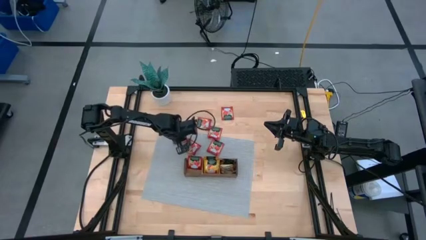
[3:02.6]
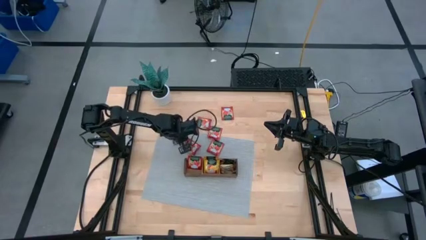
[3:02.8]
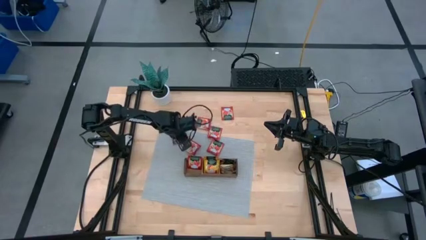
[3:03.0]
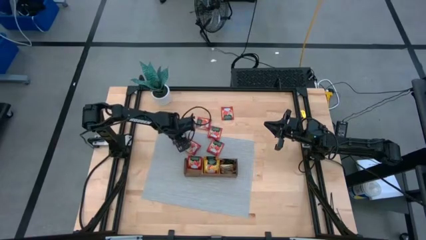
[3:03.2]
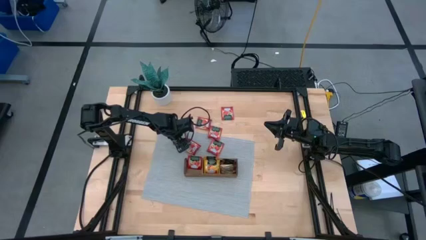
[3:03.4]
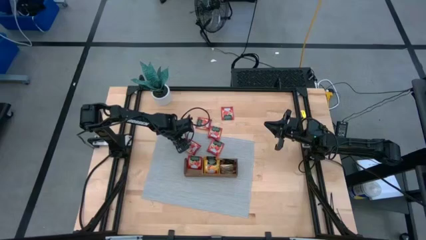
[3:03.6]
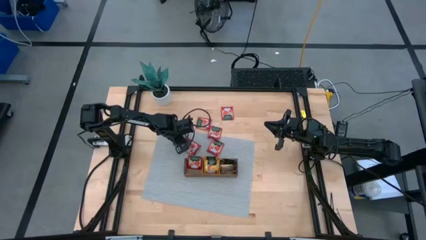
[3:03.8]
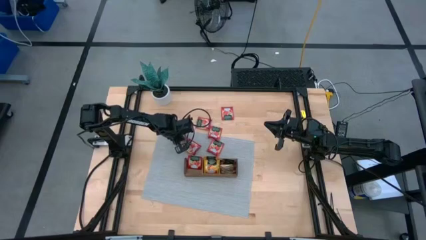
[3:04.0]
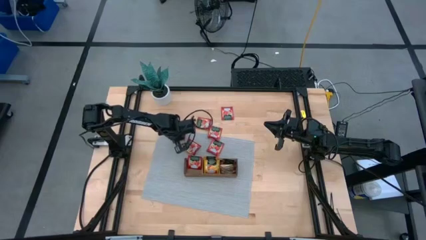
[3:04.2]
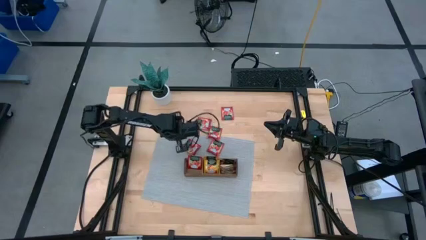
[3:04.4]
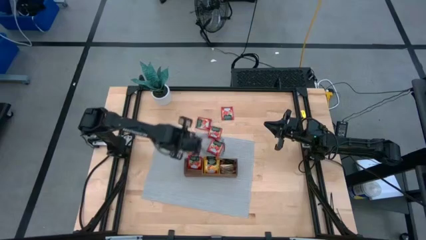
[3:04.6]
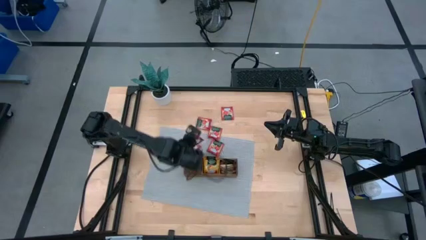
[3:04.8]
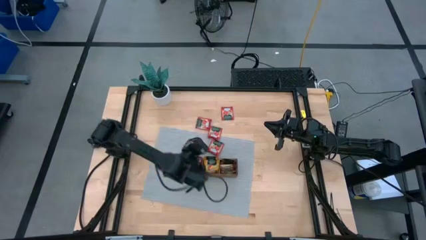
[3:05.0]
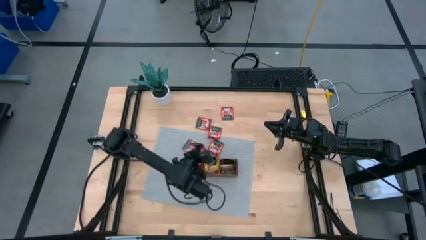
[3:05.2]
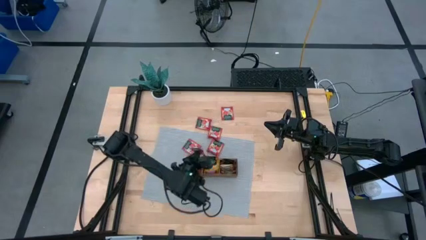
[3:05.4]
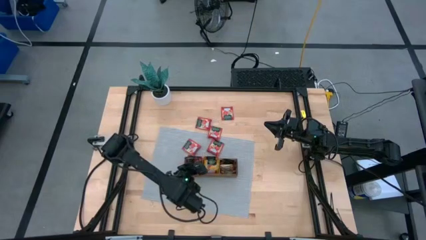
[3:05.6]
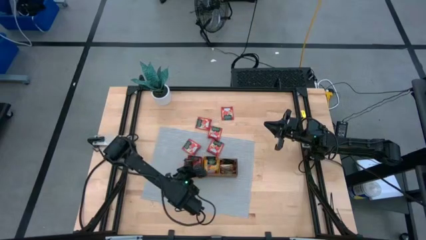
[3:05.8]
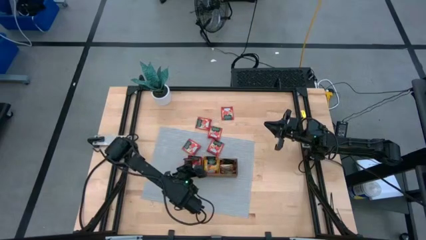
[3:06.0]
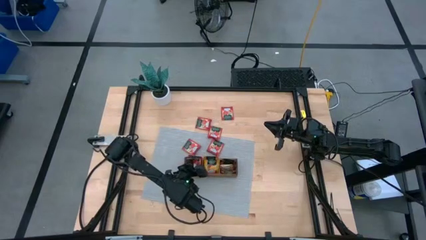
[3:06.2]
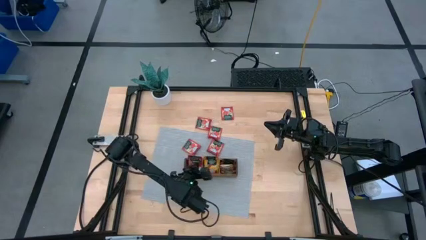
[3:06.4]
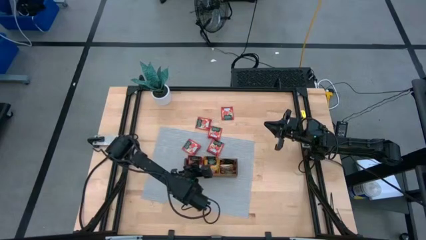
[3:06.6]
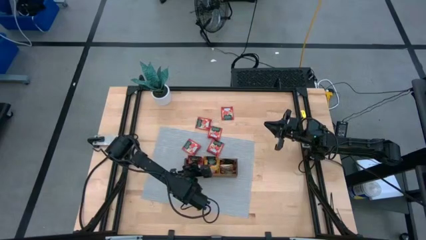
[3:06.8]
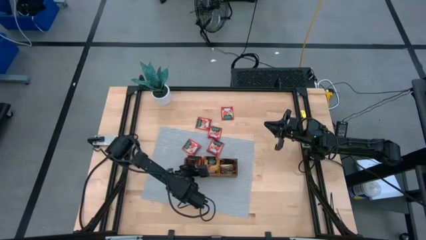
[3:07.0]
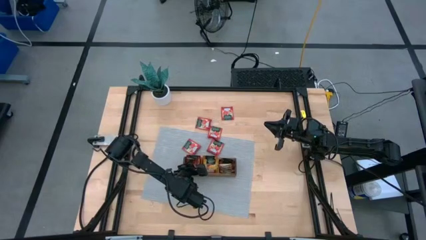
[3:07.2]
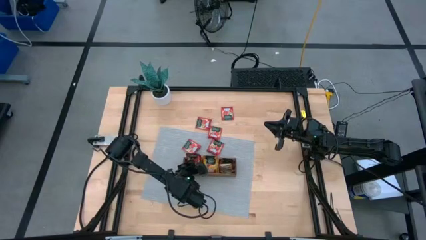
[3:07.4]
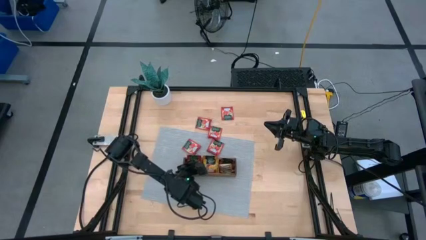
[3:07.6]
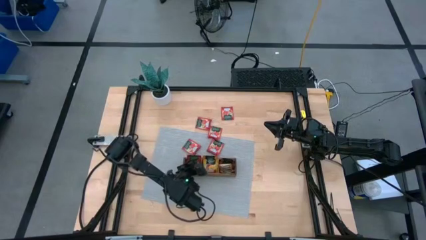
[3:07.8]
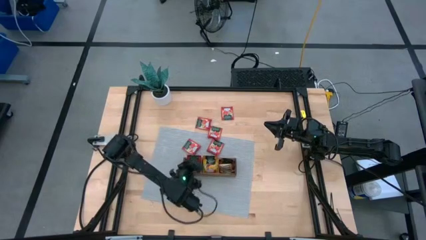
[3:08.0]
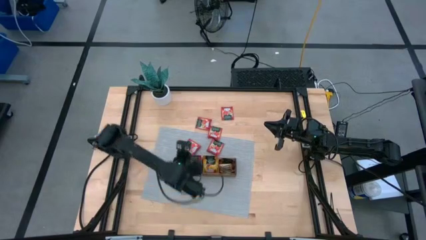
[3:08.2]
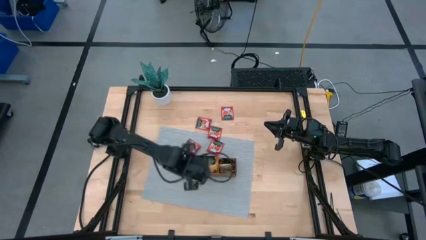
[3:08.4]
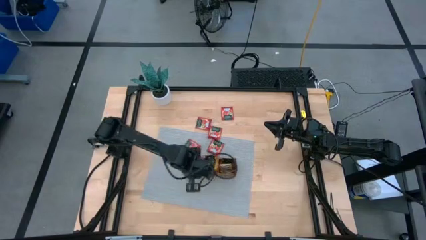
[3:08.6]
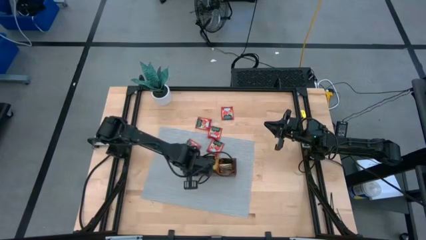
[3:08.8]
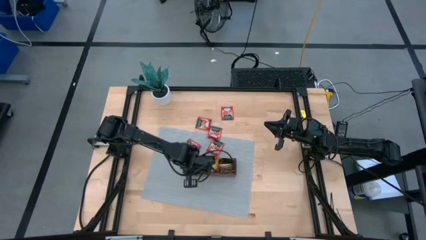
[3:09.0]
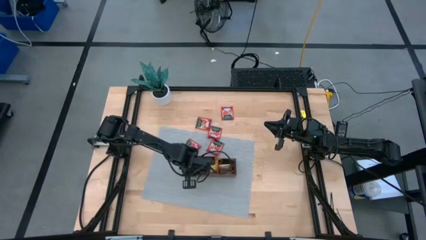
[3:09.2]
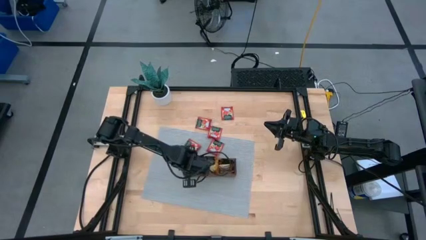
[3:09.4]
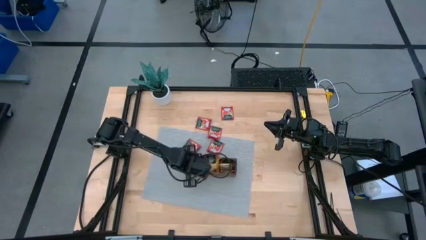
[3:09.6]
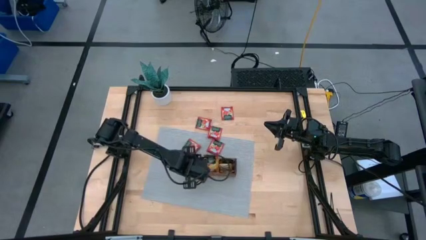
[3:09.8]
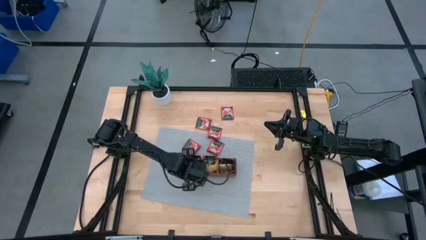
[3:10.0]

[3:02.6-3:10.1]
Task: Pick & Place Tea
Put the red tea bag into the left compartment of the wood organizer

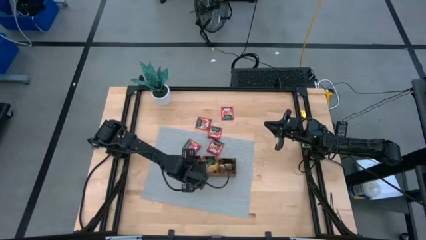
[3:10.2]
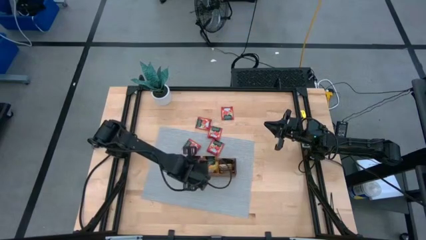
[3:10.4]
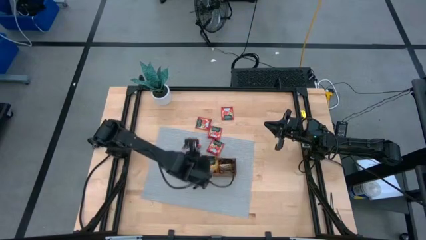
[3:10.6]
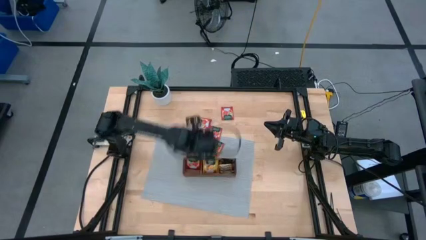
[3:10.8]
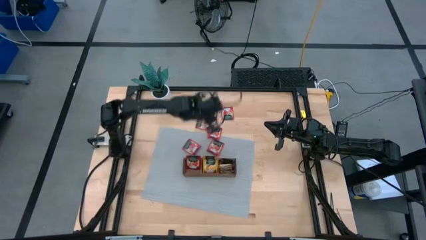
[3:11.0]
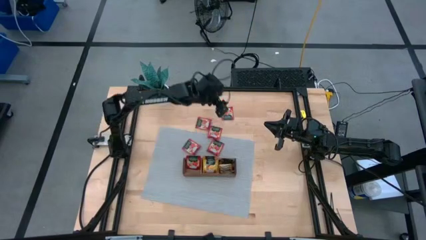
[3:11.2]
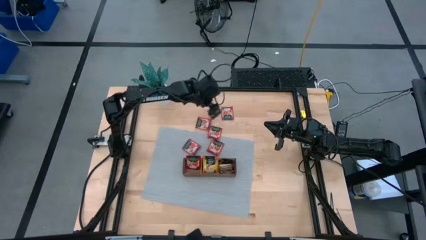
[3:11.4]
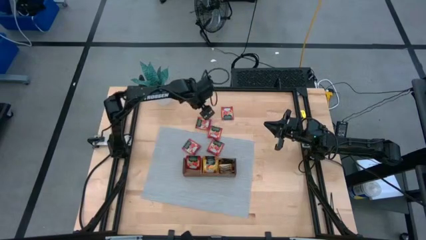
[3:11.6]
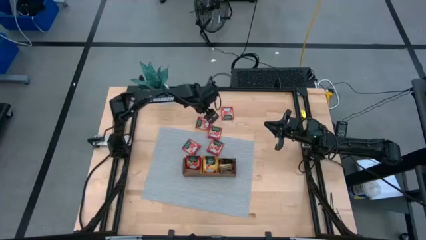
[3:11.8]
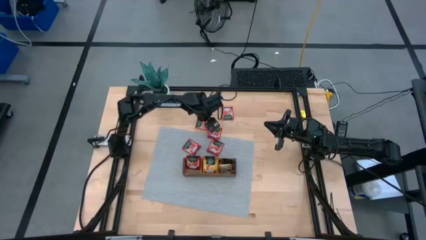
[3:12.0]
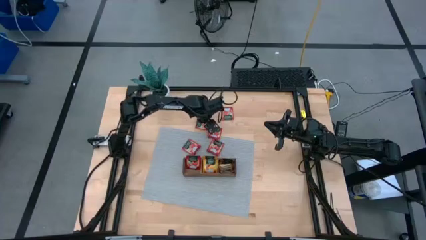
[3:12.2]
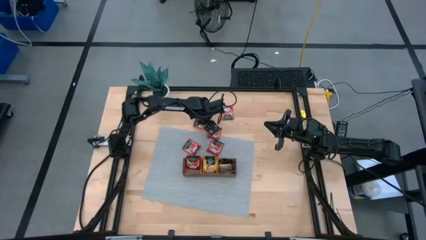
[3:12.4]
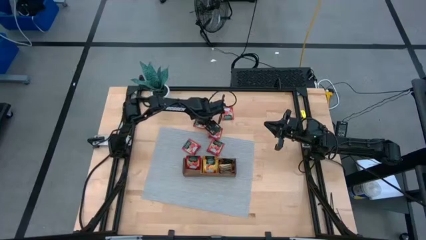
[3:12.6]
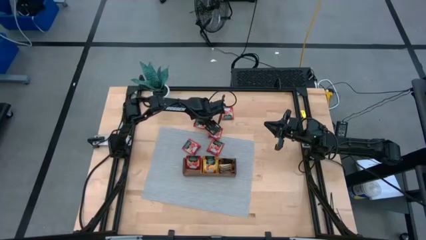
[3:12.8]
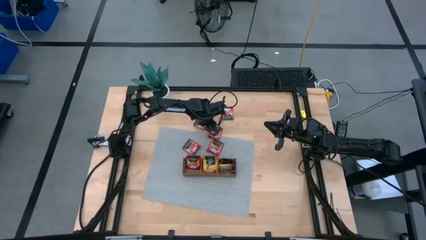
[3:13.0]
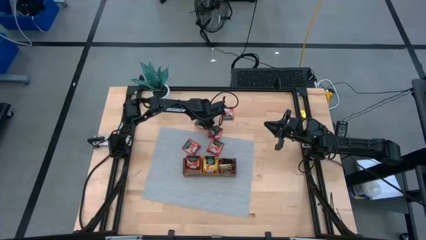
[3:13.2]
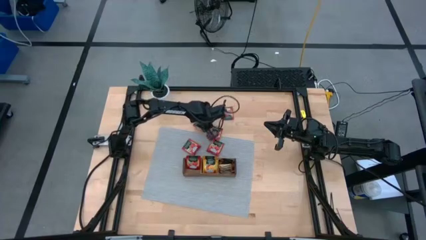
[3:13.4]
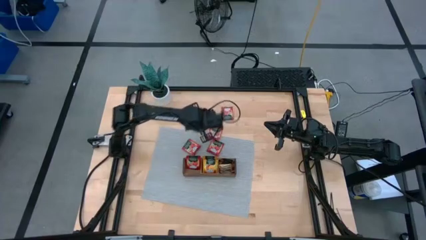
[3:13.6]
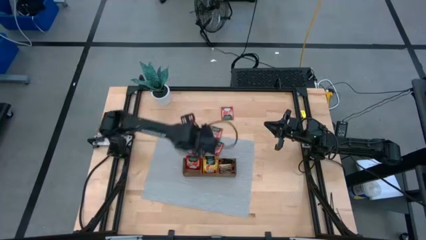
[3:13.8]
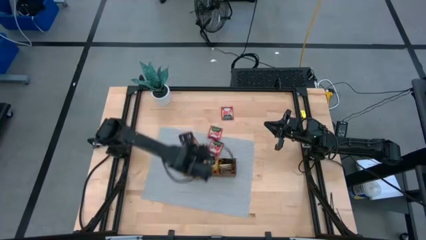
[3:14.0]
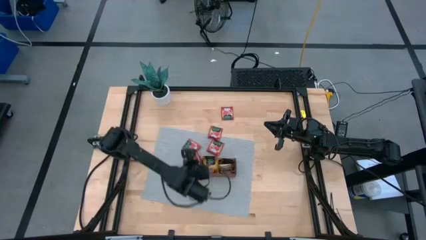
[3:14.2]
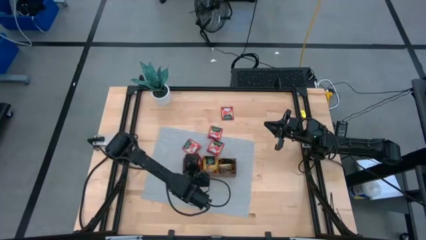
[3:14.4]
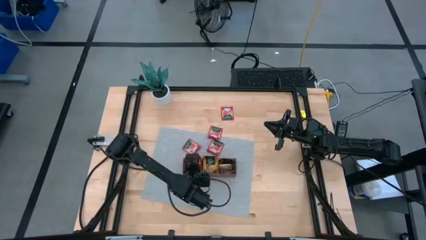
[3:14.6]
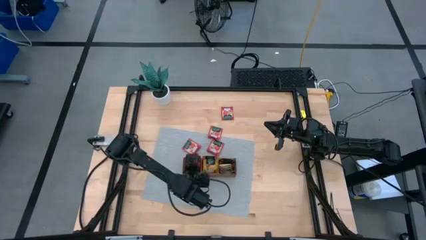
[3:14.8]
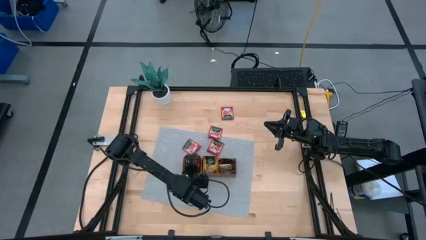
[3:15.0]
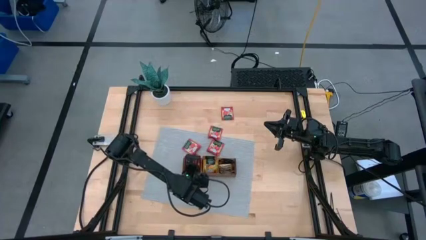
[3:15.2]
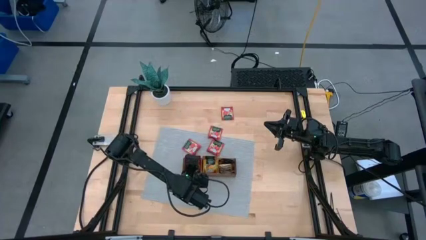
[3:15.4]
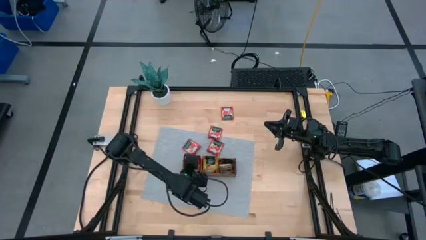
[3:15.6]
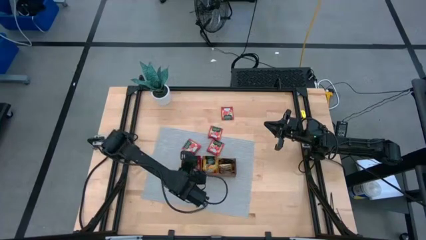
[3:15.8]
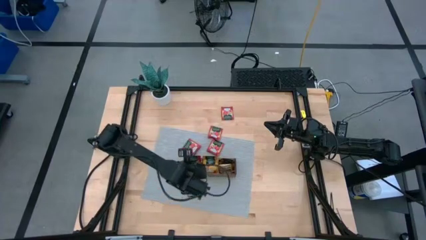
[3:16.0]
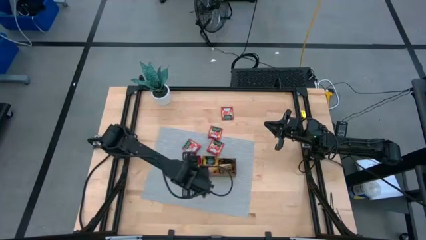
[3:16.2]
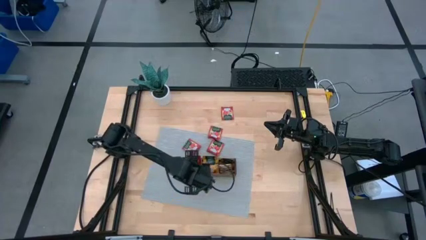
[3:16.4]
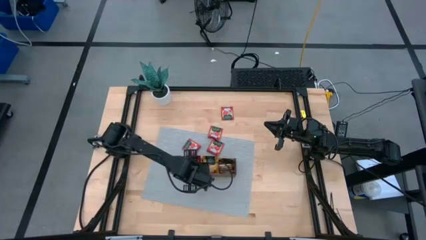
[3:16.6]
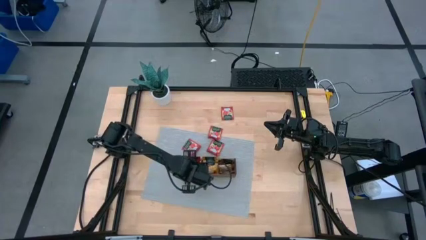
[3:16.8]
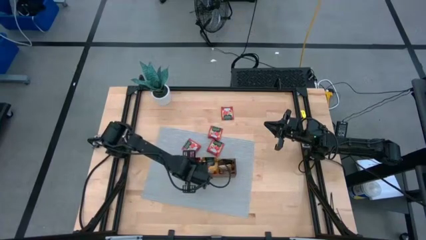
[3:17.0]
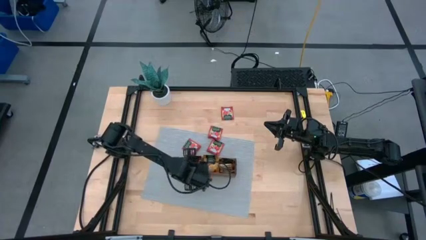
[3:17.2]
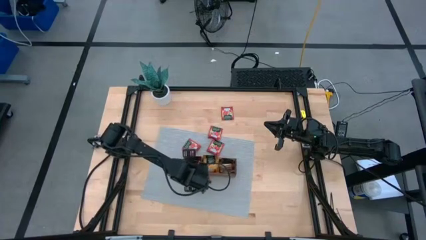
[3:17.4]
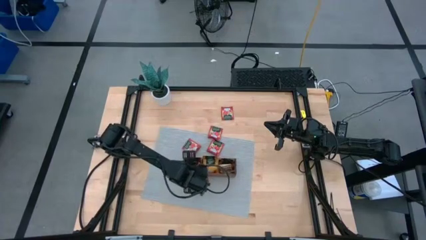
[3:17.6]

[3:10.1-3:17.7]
Put the red tea bag into the left compartment of the wood organizer

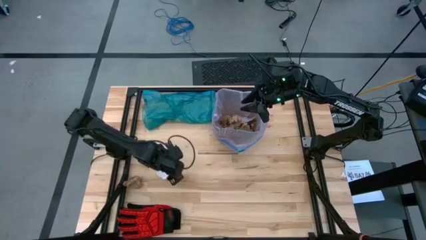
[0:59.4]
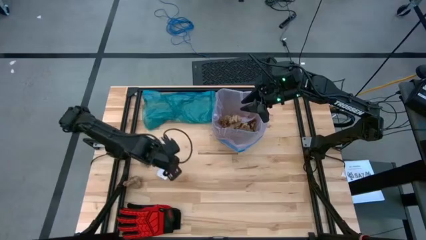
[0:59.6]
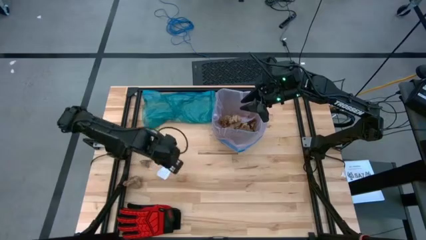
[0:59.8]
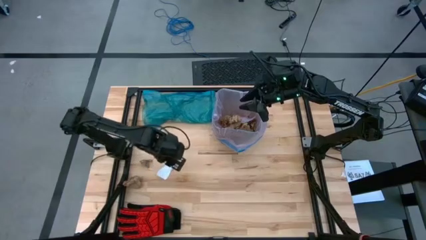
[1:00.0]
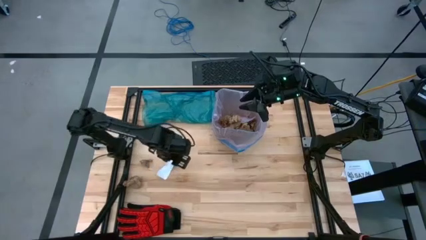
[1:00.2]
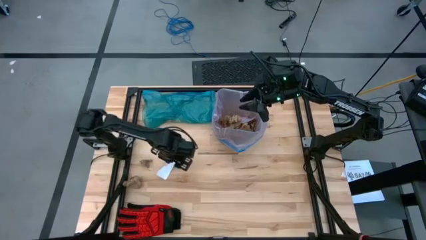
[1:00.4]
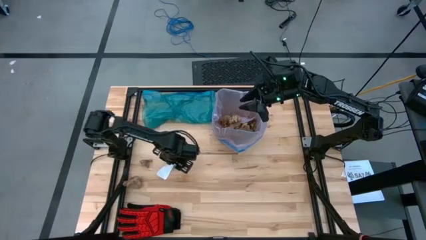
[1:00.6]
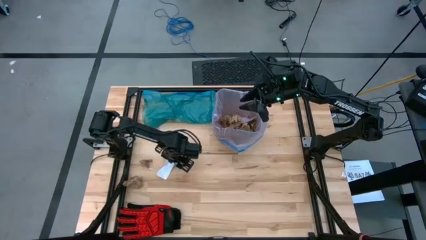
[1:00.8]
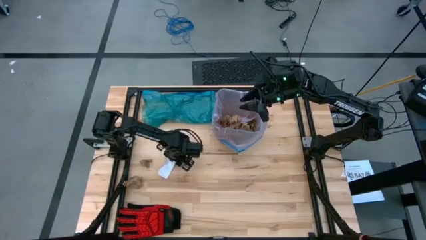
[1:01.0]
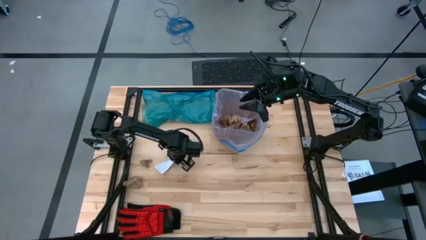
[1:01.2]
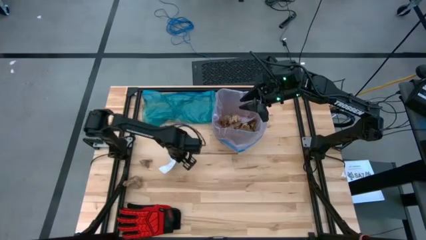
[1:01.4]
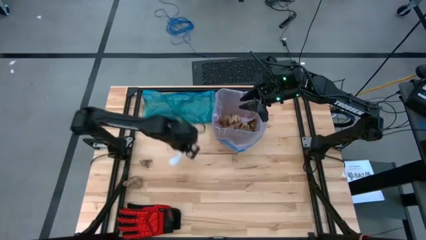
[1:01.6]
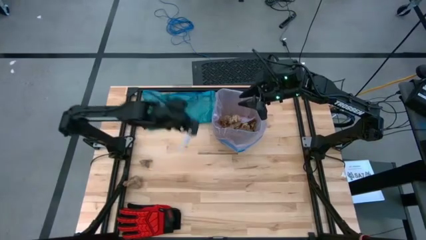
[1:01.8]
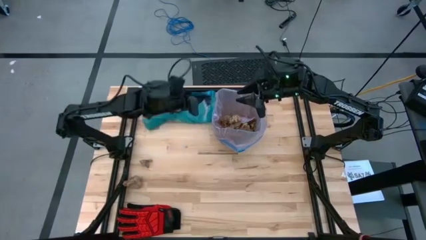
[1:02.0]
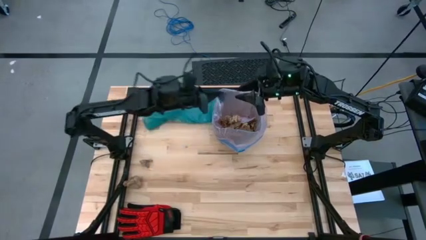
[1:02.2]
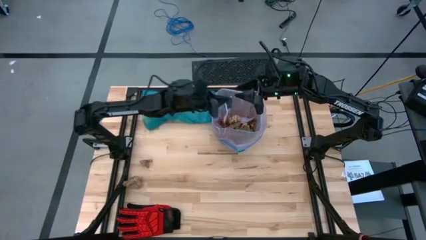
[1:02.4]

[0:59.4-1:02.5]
Task: place trash/remove bag and relplace
Put the white paper into the black trash bin
